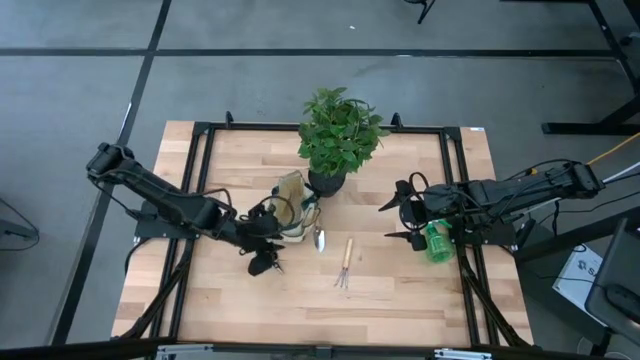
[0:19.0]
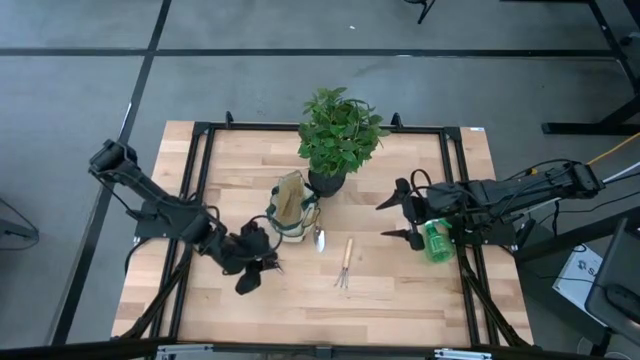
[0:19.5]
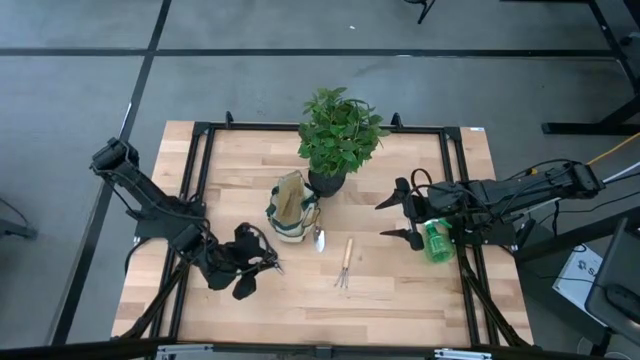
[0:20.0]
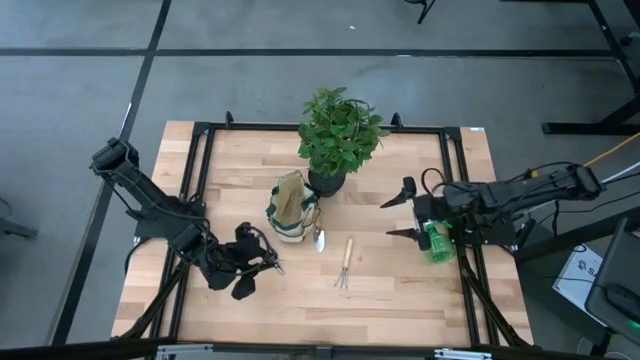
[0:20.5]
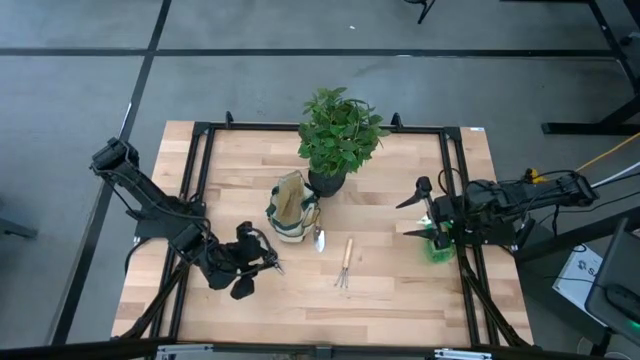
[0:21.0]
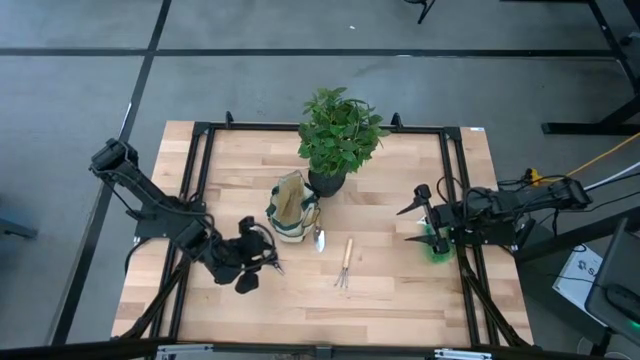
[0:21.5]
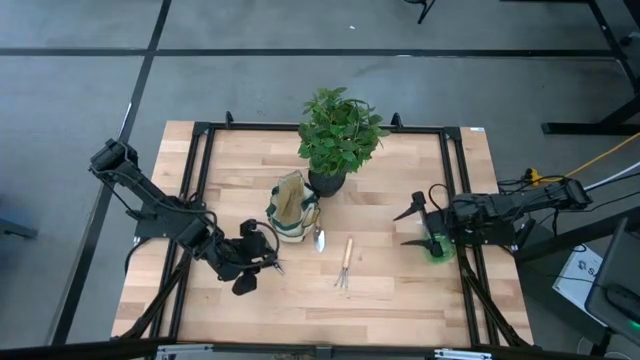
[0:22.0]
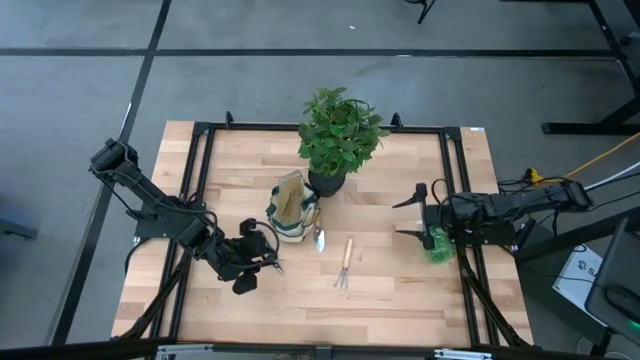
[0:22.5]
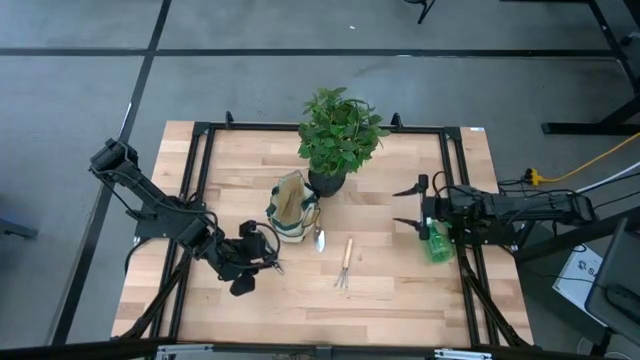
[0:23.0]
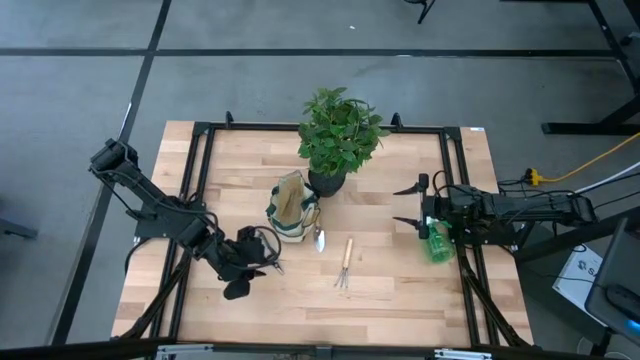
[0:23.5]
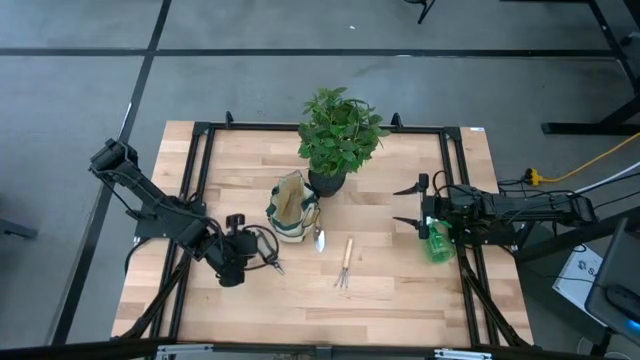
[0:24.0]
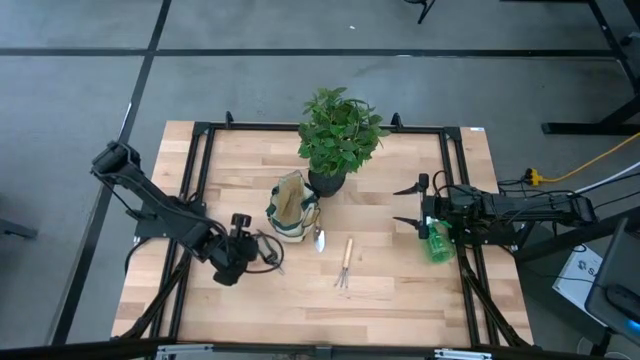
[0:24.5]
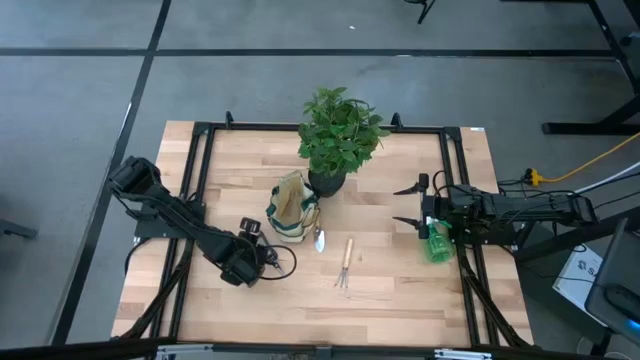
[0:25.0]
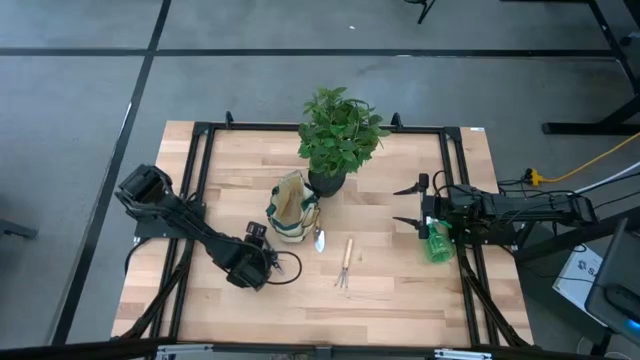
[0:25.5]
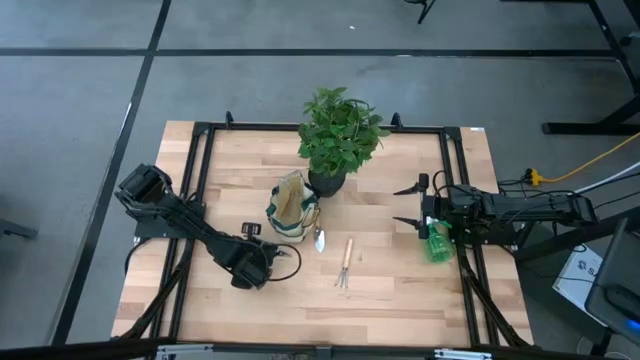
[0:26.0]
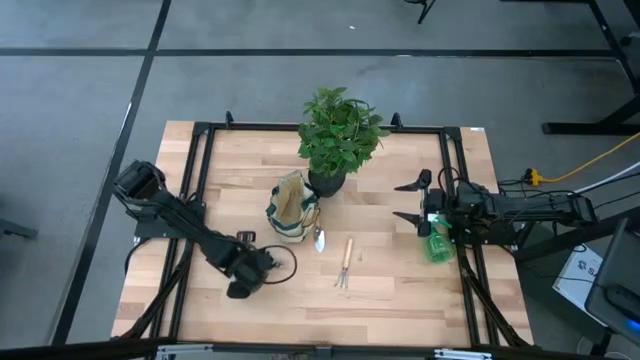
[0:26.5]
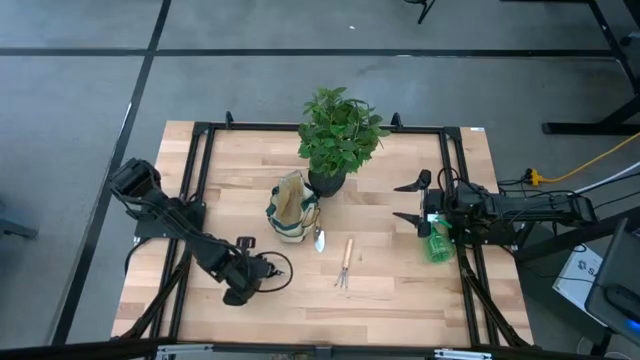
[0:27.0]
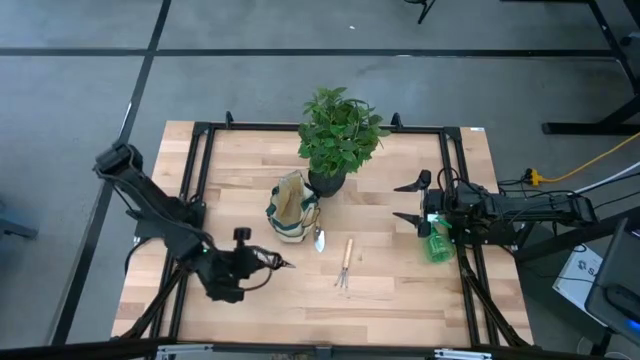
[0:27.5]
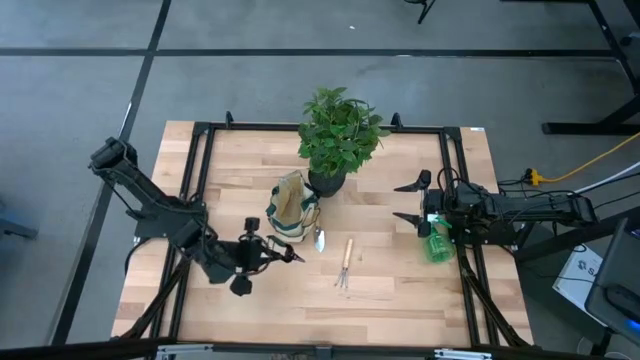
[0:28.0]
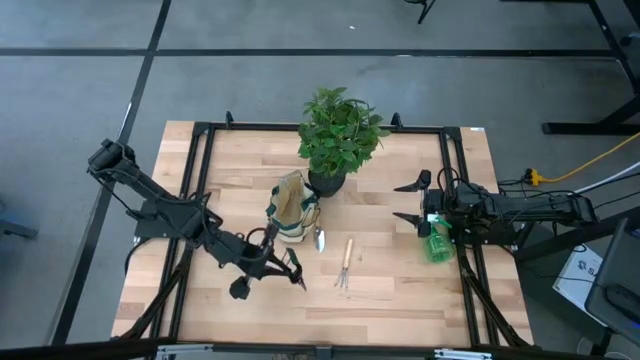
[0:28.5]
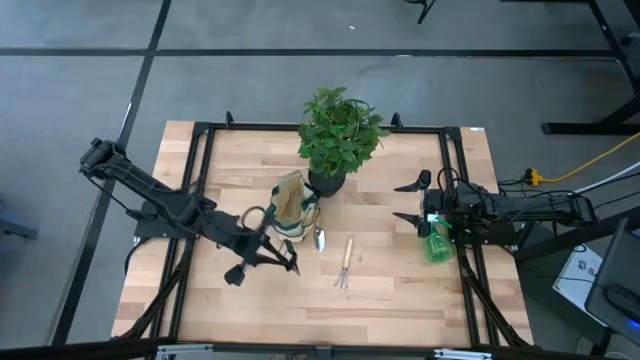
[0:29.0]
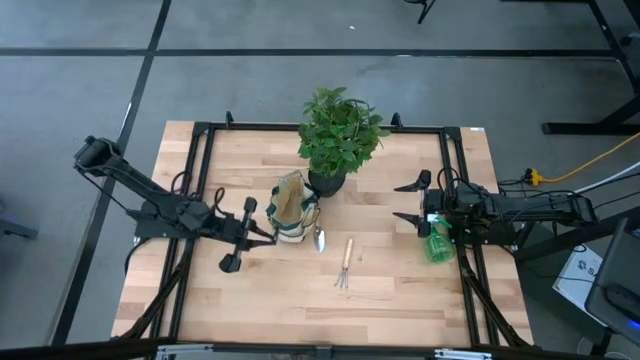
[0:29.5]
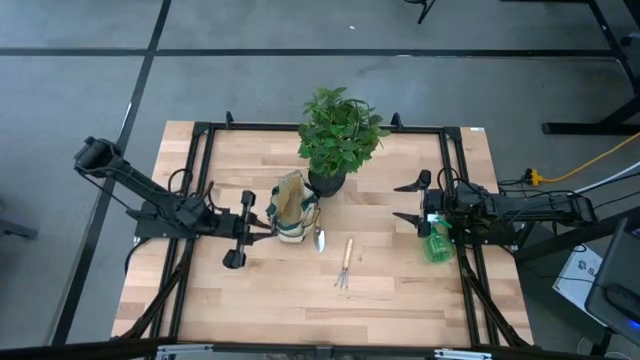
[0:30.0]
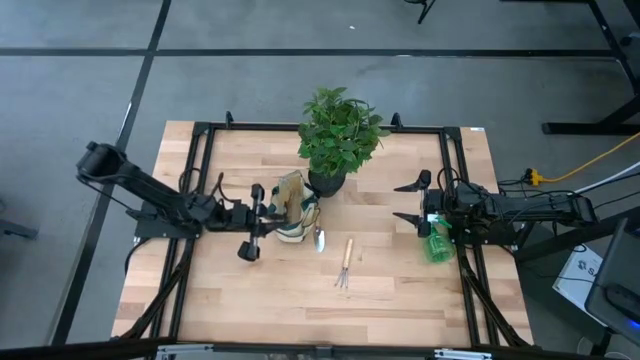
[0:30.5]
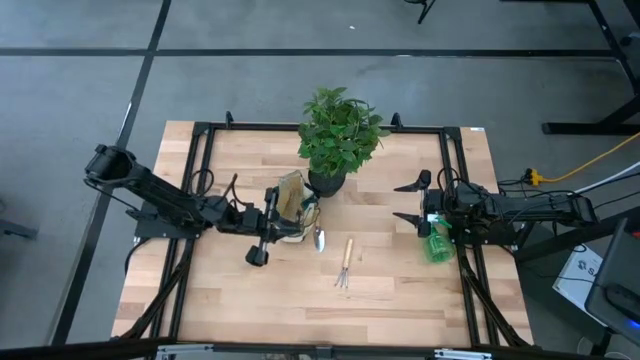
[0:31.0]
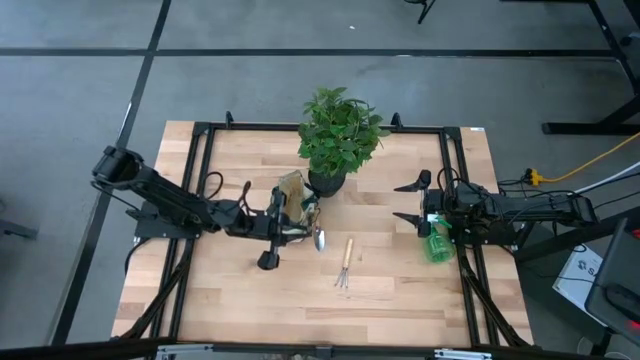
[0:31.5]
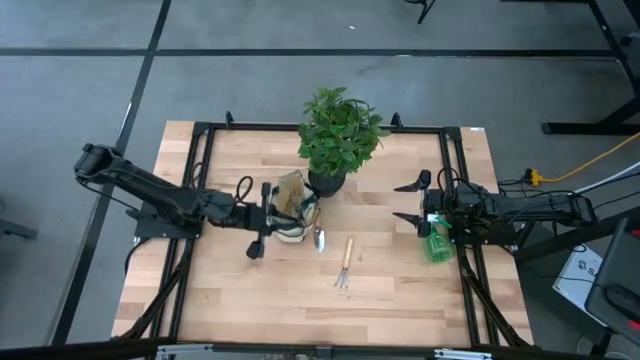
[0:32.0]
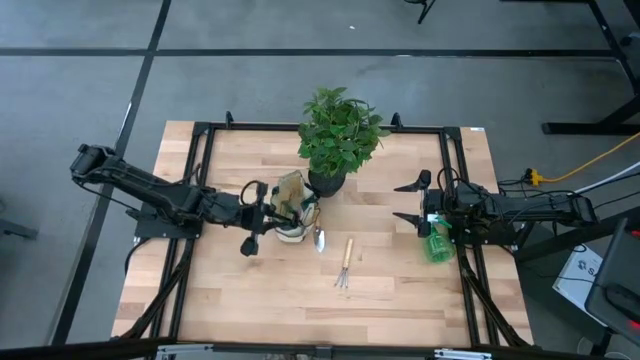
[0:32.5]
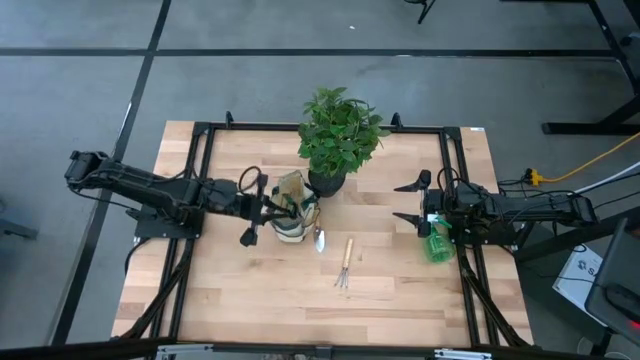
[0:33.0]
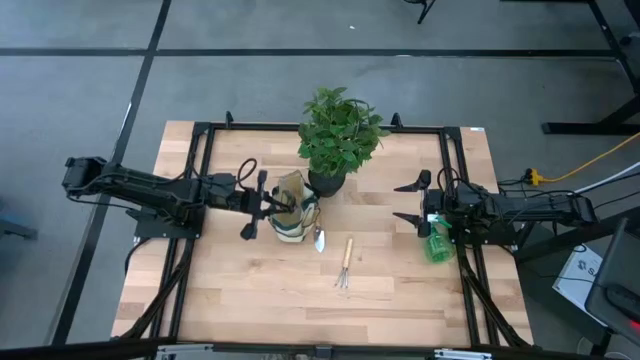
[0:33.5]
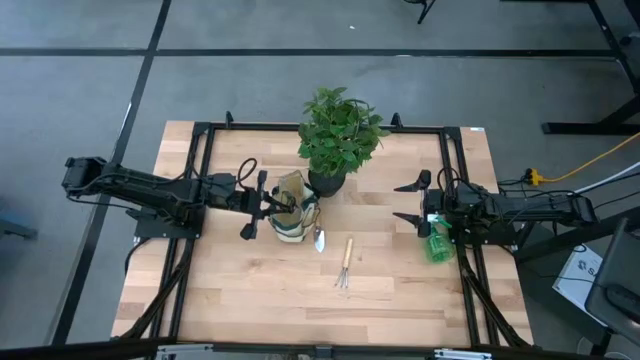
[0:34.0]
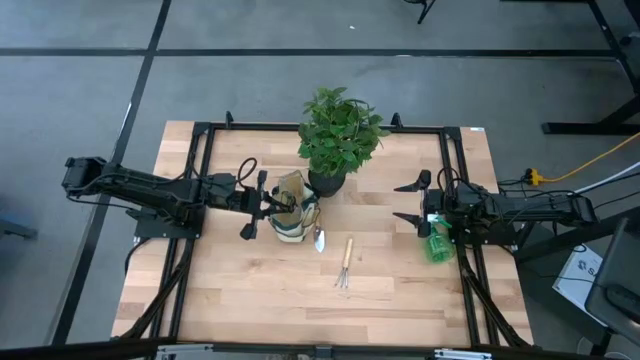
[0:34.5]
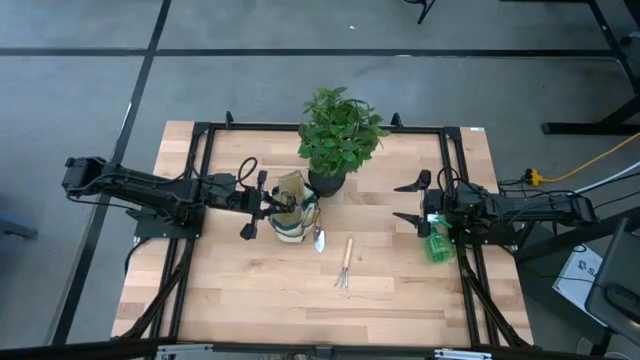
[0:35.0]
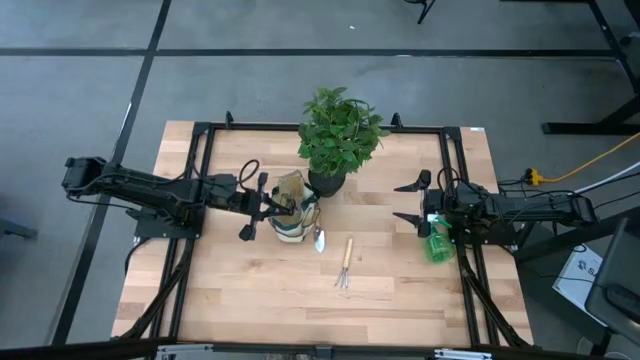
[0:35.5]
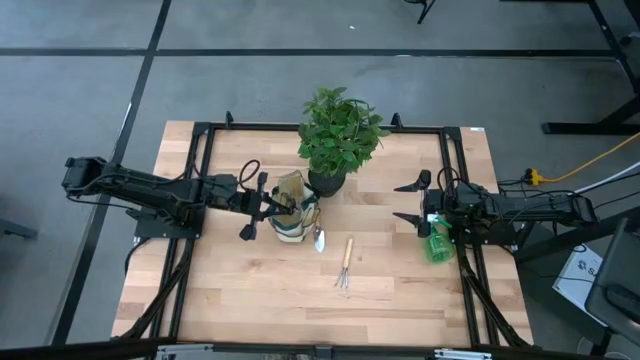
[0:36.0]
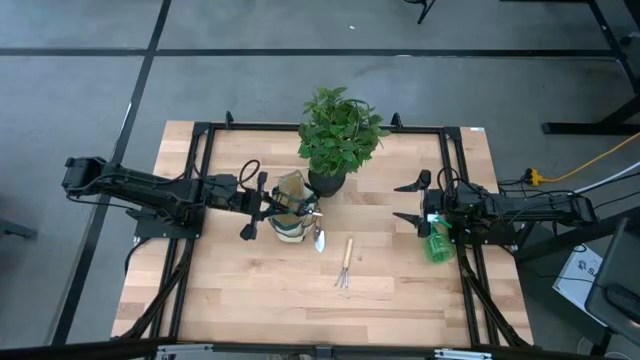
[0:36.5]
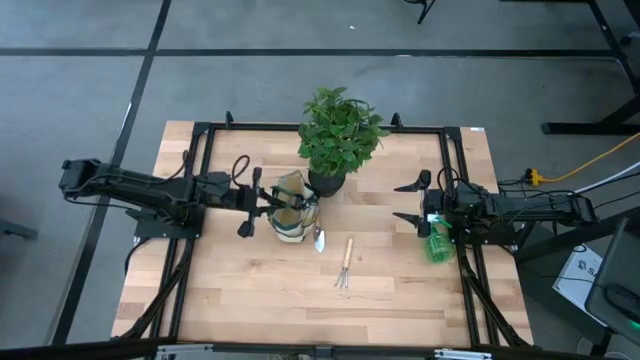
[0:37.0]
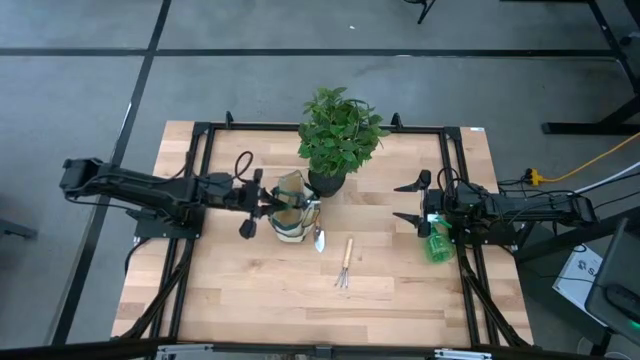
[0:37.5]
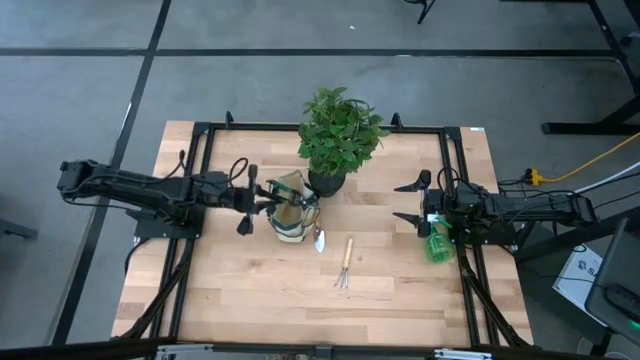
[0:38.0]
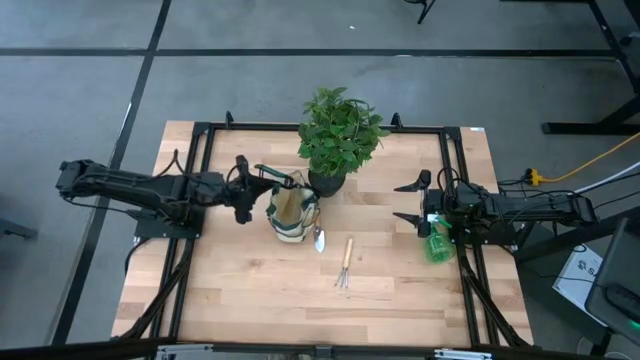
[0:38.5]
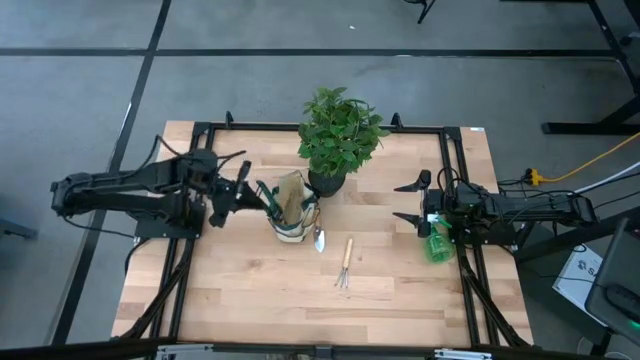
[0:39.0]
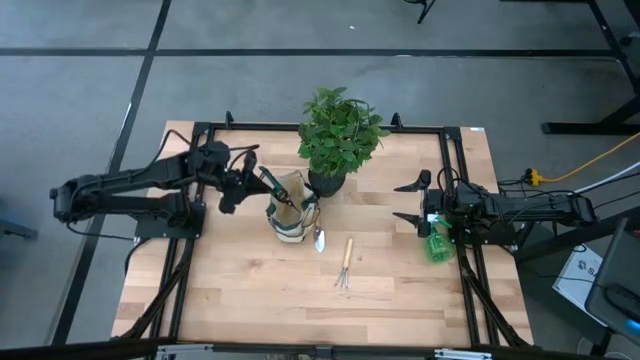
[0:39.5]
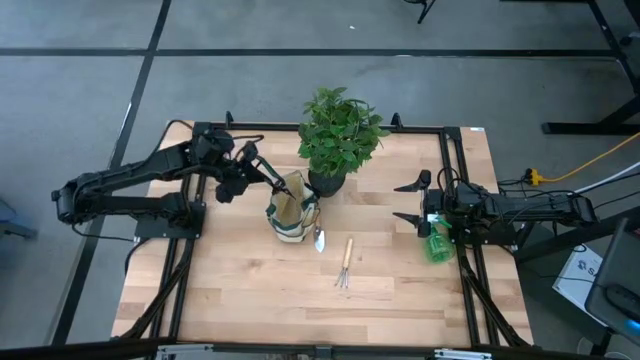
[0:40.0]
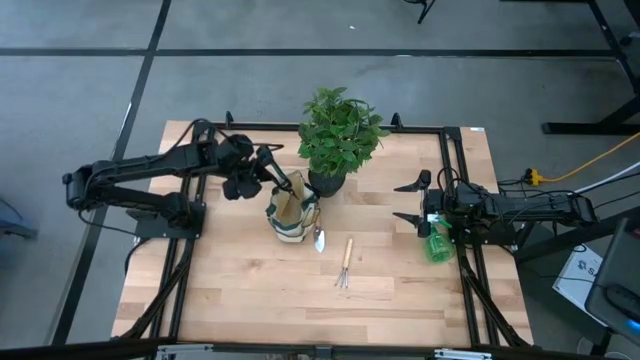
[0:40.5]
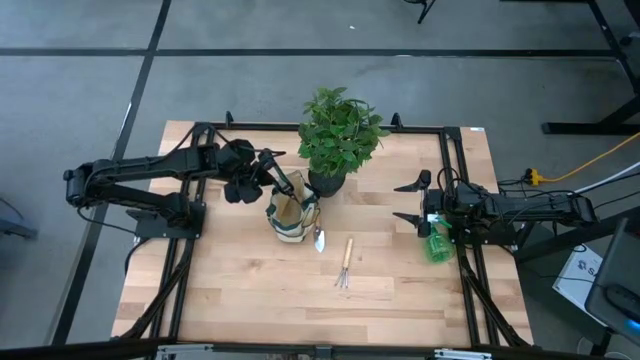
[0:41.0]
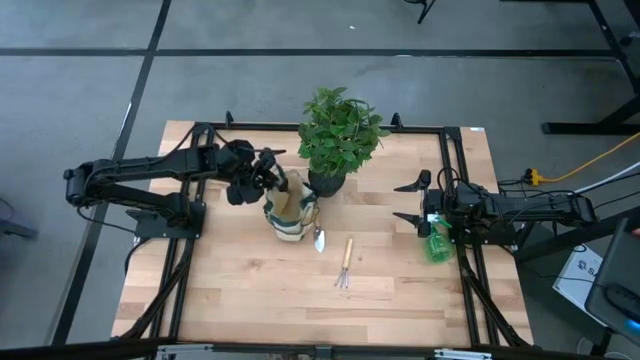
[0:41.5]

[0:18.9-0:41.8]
Task: Pick & Place Garden tools in Gardening bag
Put the green shears into the white bag
